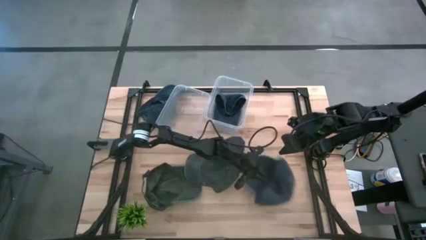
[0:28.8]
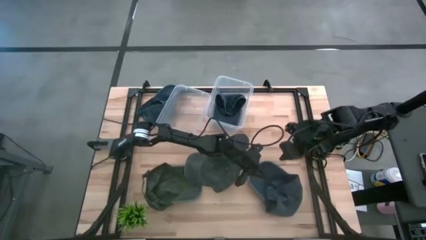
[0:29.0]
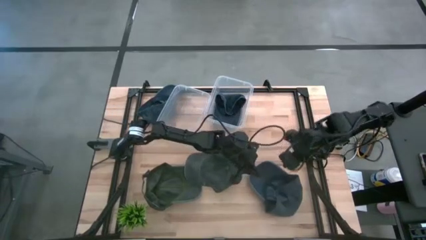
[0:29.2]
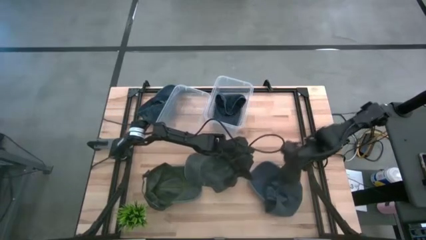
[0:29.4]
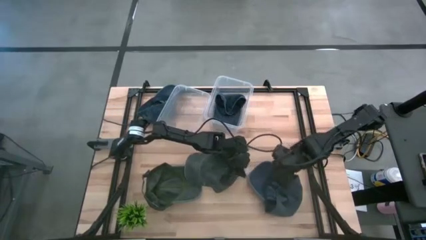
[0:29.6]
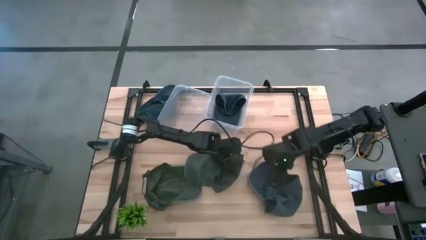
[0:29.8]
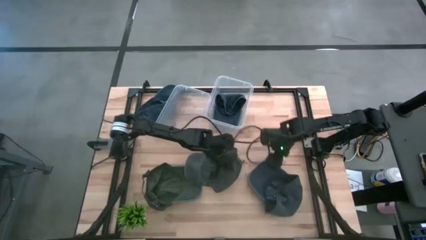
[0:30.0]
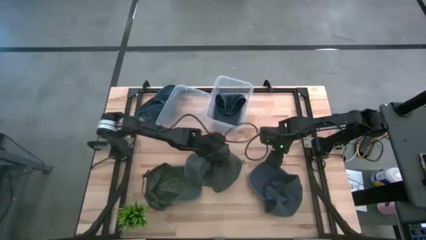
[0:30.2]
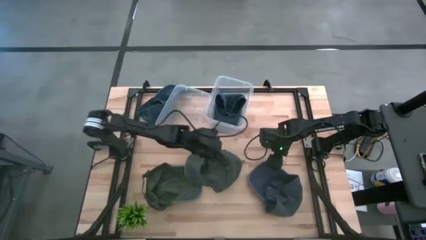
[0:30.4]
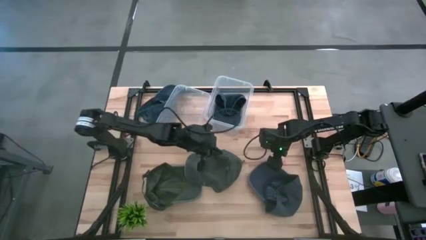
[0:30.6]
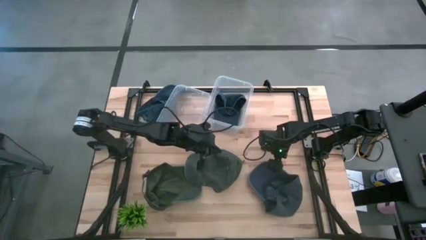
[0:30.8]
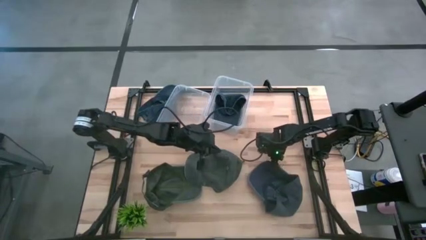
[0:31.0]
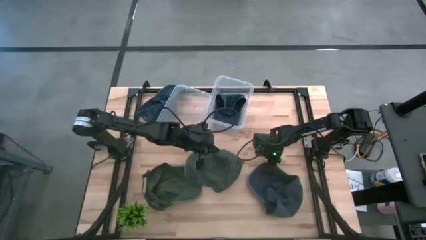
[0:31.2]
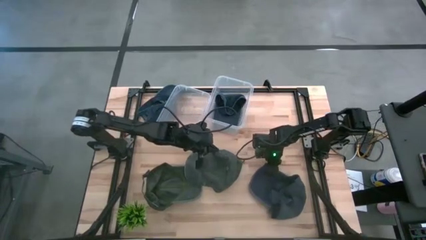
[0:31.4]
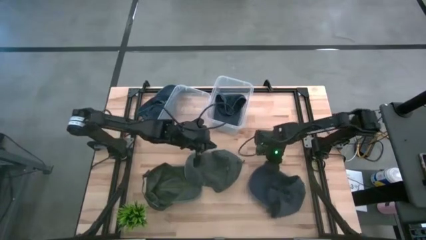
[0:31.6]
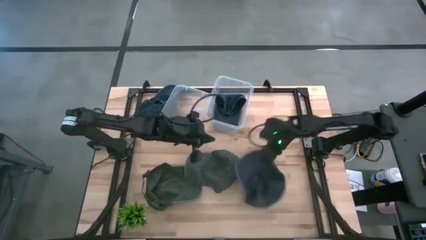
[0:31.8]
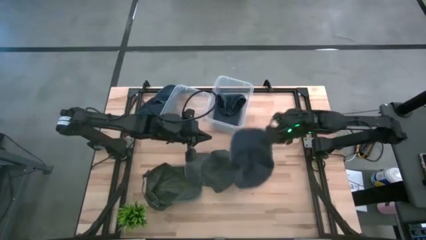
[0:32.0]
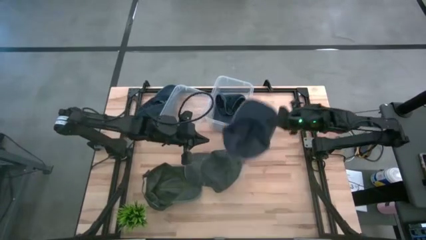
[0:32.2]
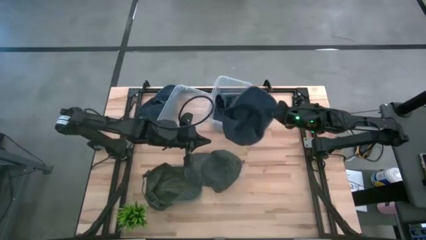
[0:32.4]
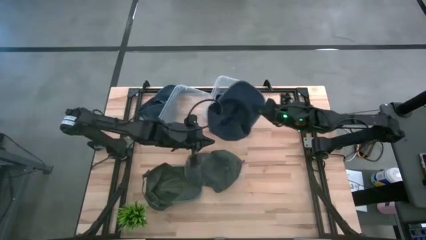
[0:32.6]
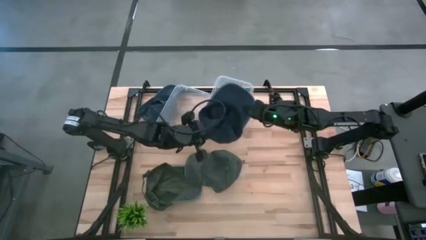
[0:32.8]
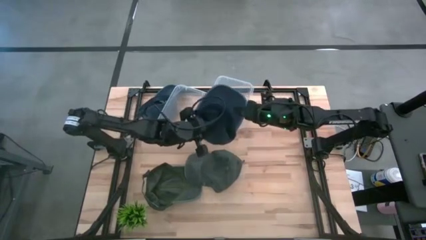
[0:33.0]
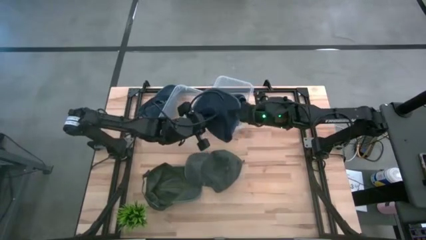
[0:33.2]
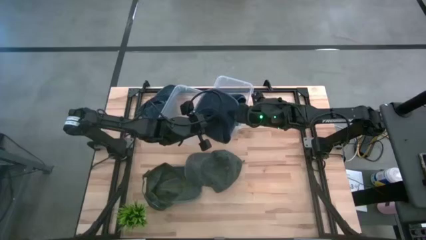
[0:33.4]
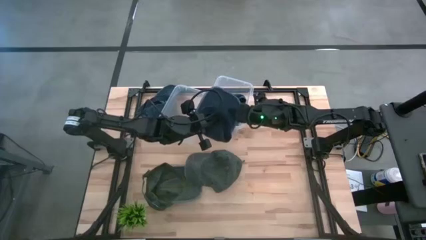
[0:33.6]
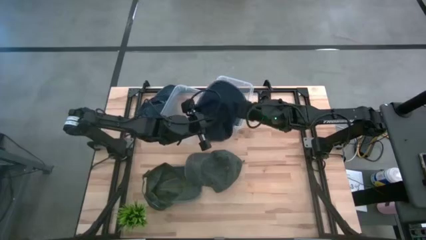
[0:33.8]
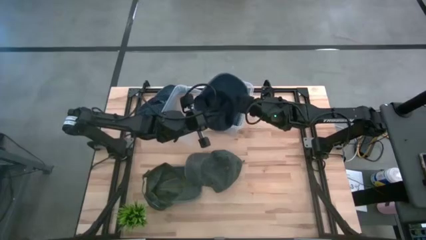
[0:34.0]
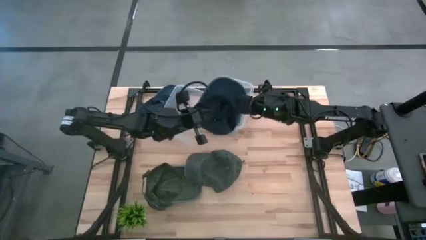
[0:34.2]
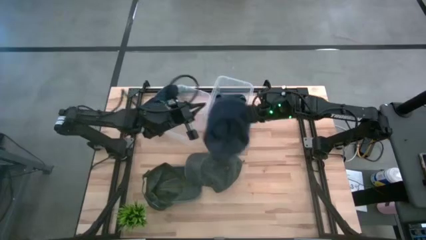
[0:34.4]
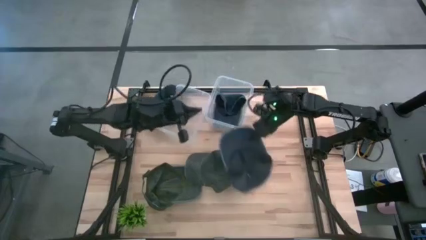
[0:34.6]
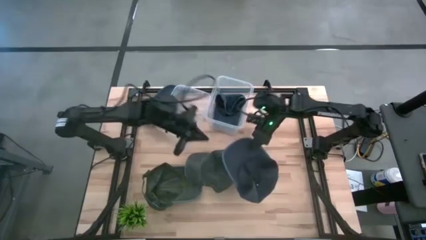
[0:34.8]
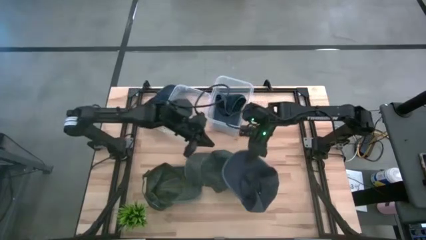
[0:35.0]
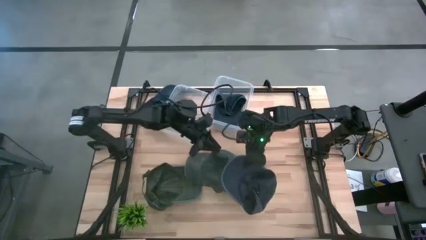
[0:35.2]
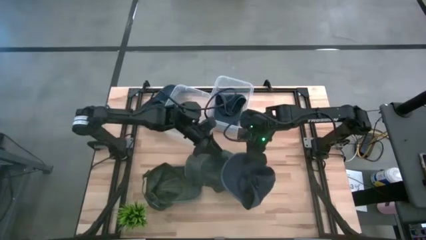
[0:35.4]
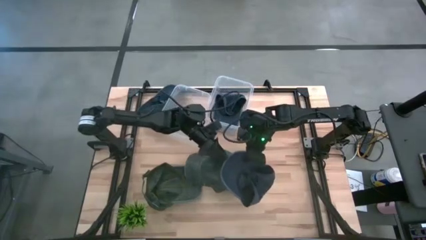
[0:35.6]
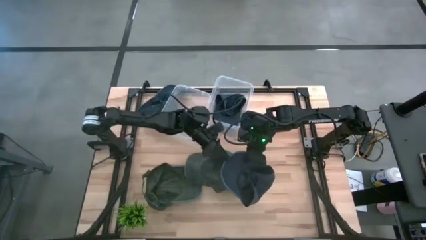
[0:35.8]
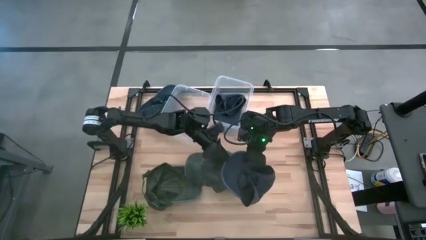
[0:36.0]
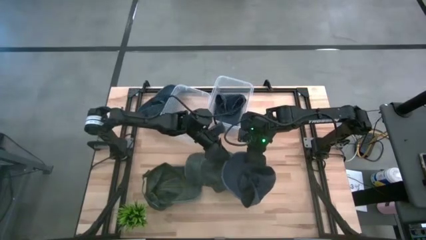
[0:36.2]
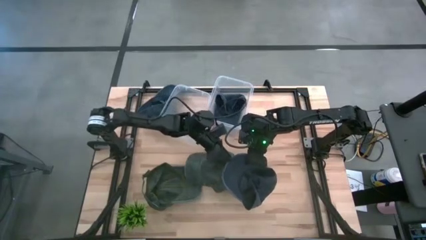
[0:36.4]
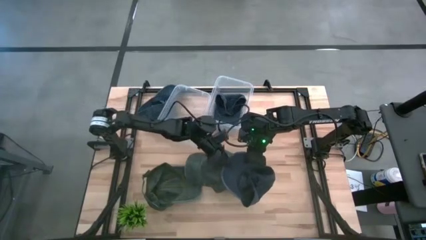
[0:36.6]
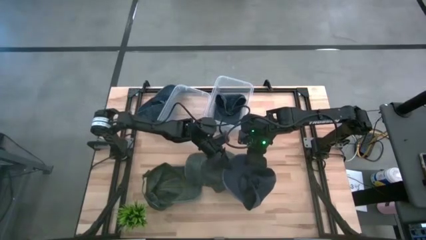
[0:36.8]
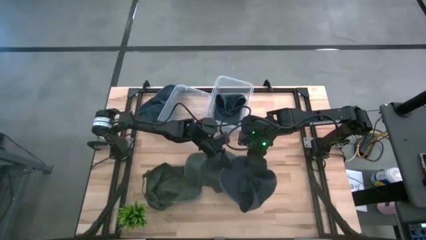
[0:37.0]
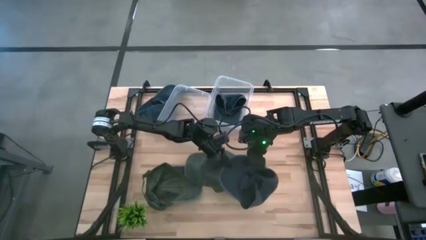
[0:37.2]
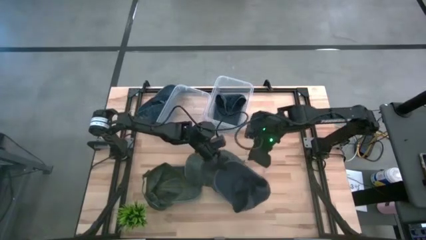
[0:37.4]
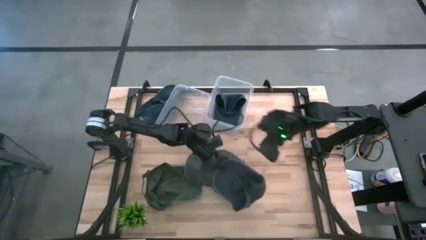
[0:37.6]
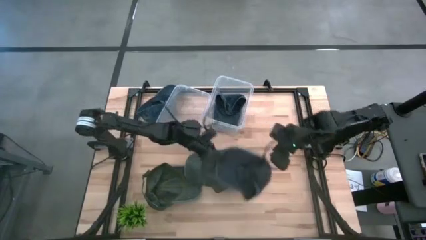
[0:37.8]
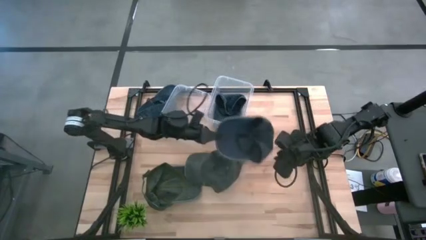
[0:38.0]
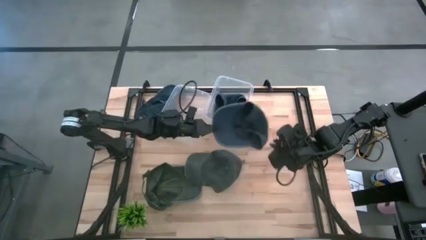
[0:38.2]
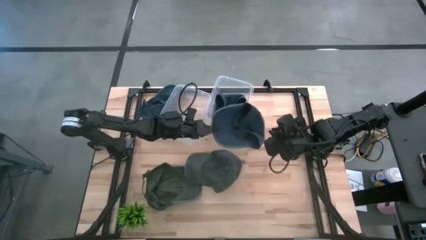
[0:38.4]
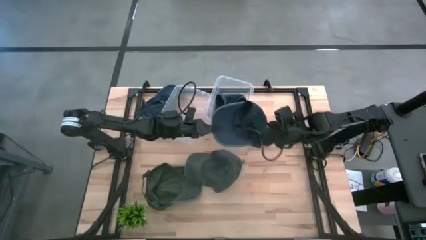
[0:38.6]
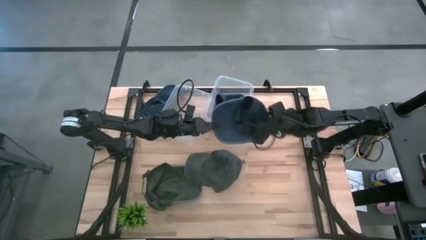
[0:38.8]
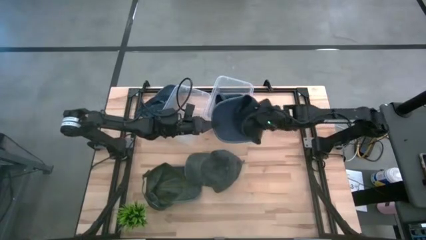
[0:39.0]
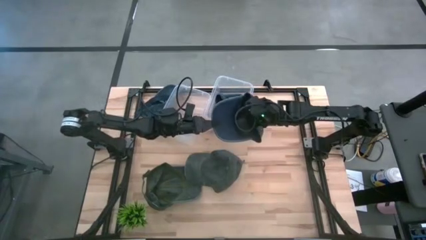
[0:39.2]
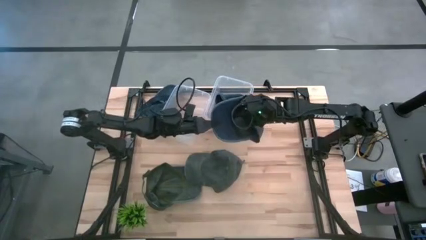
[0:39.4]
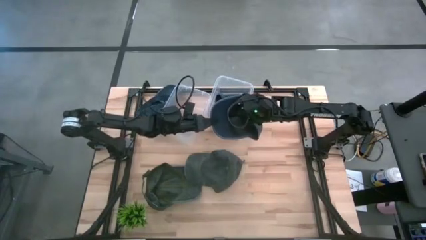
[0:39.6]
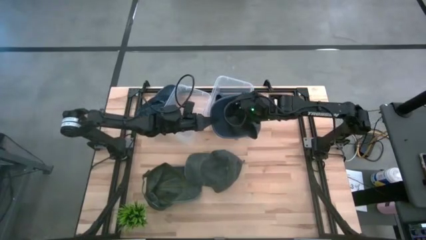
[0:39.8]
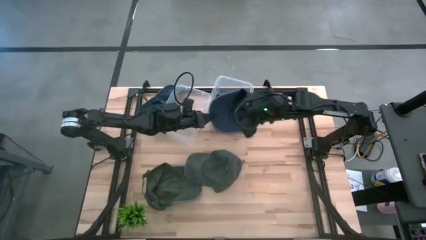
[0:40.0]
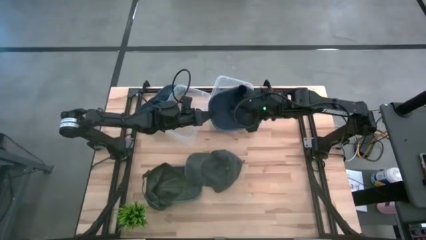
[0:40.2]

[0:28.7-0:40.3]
Task: Pick & Place hat
Put the bottom blue cap into the right transparent bin

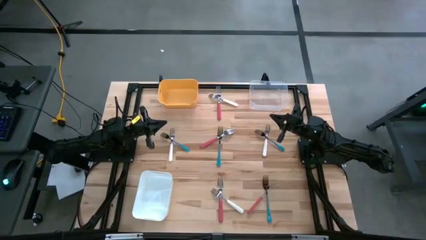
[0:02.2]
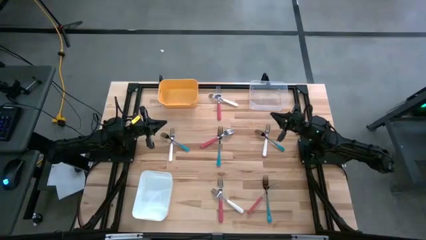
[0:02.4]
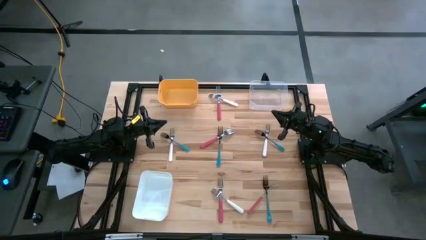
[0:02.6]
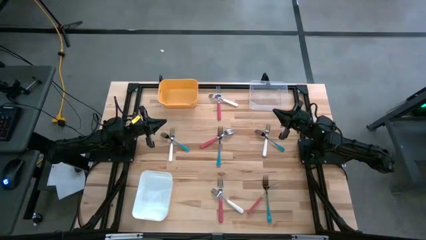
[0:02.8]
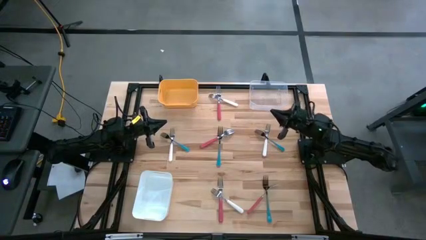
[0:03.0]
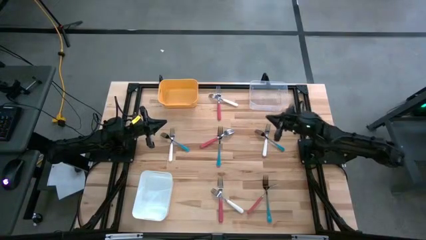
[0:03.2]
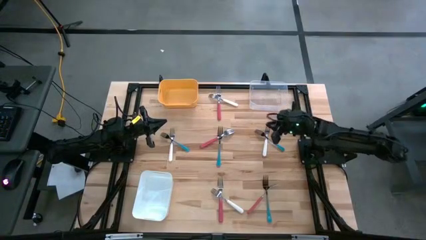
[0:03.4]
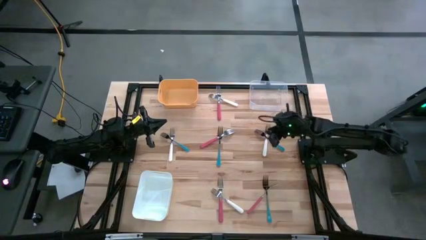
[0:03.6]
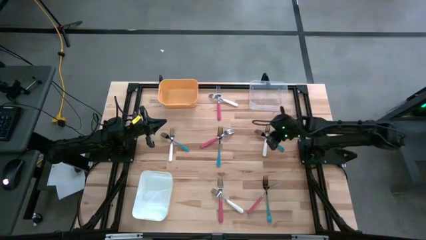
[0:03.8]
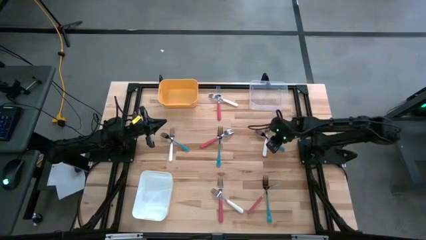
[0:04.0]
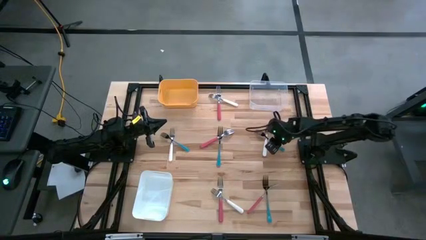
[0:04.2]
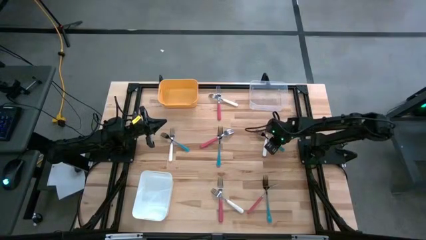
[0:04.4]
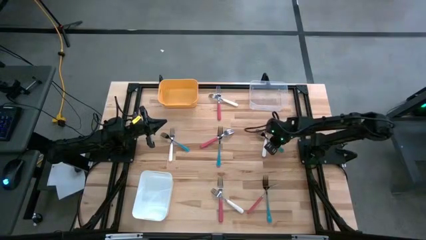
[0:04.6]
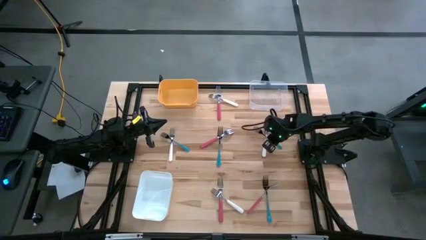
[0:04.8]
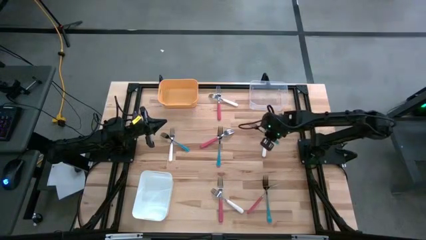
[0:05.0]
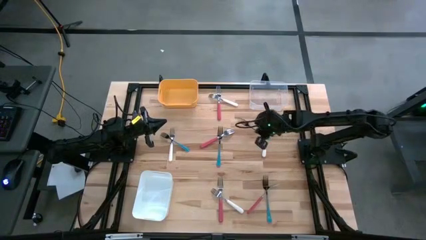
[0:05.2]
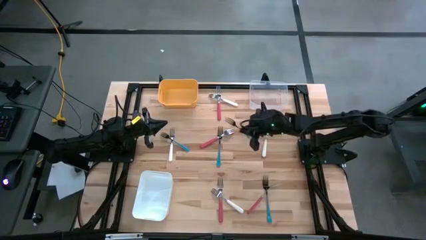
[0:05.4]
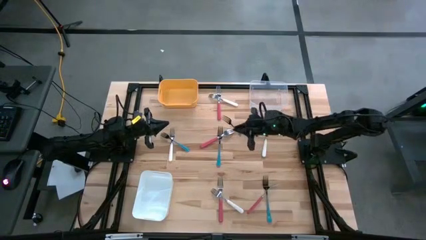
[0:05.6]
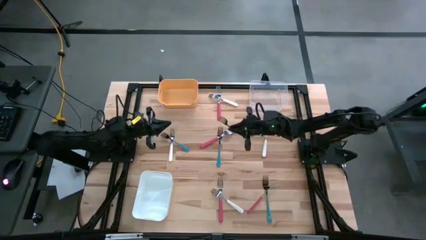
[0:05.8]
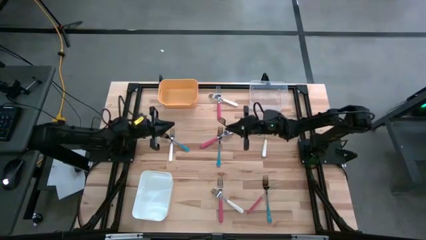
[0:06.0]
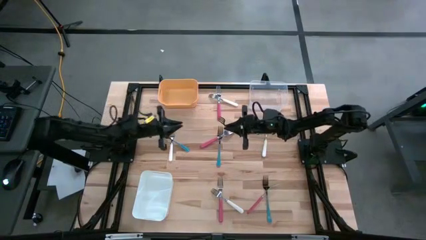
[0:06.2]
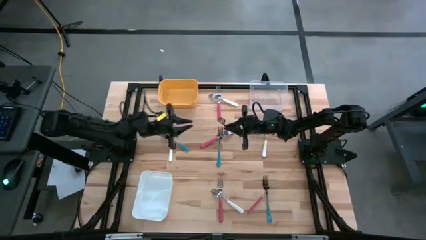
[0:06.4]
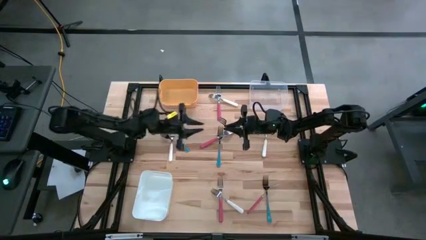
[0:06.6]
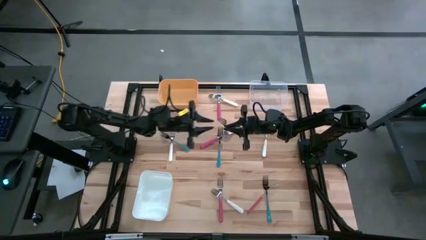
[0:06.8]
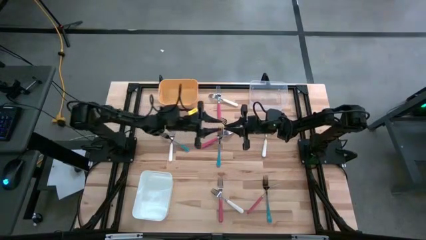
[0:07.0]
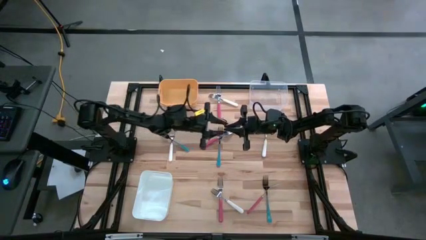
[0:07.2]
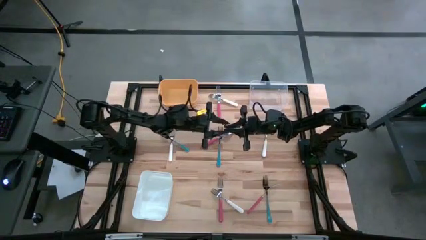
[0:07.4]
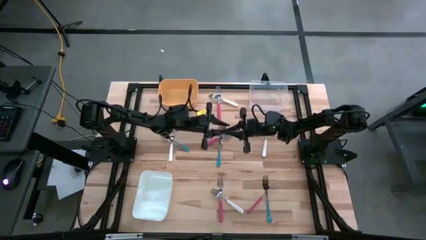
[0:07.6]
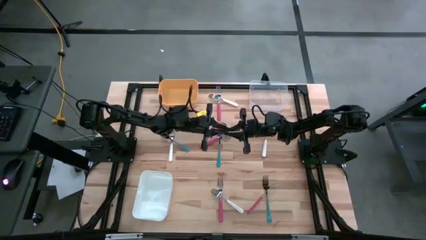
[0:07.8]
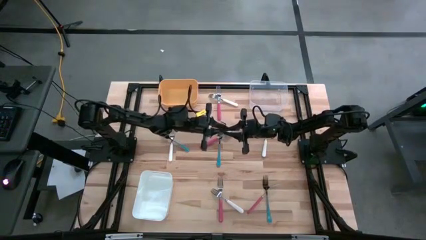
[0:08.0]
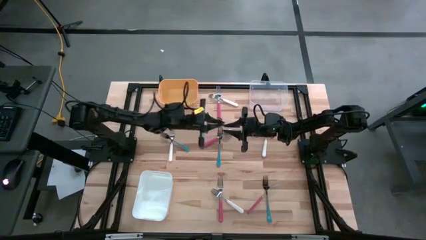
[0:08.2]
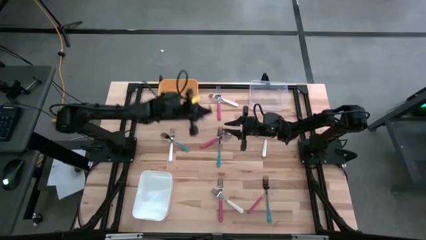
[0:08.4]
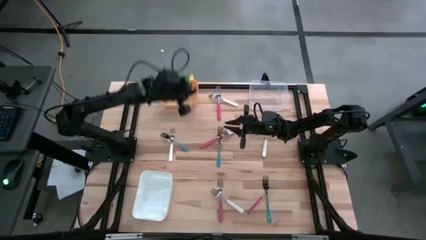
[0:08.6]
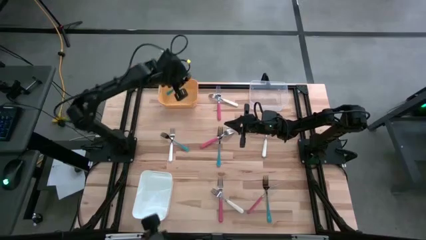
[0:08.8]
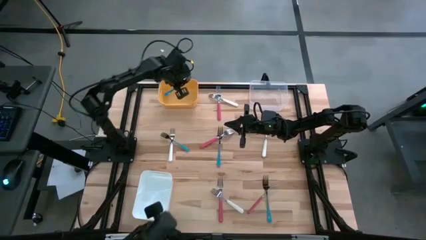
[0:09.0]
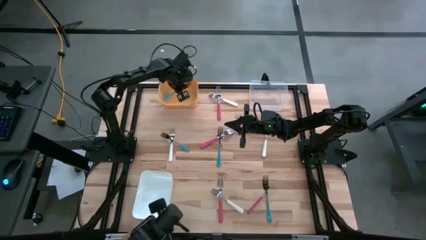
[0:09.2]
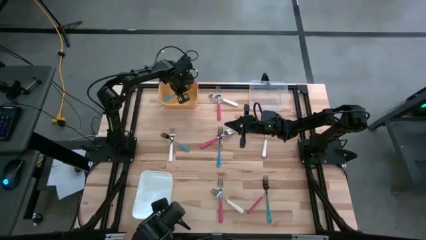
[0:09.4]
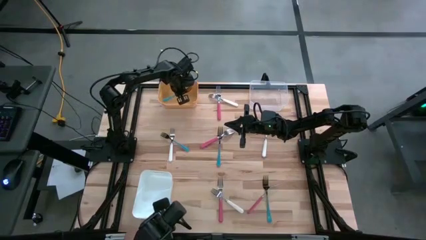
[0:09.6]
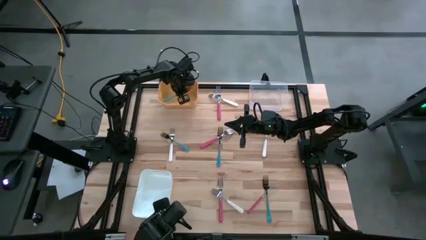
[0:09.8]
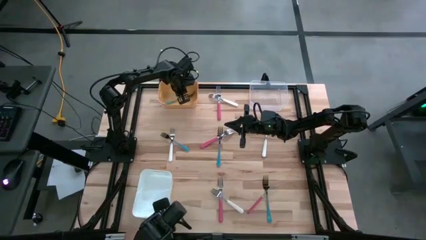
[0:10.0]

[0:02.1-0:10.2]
Task: Sort silverware by color (type)
Put the blue fork into the yellow bin
